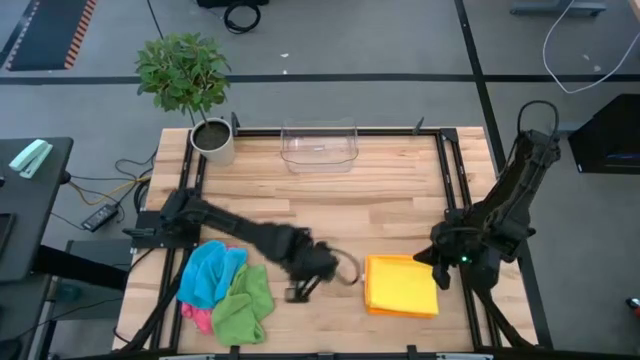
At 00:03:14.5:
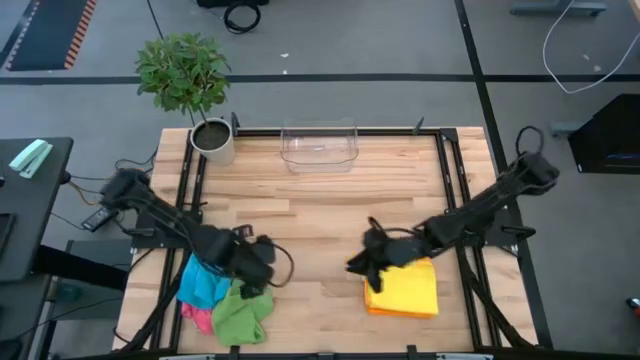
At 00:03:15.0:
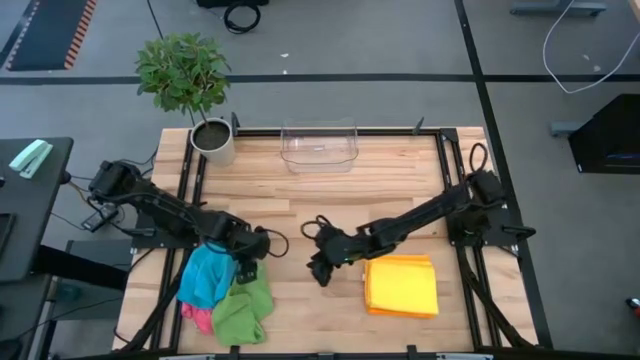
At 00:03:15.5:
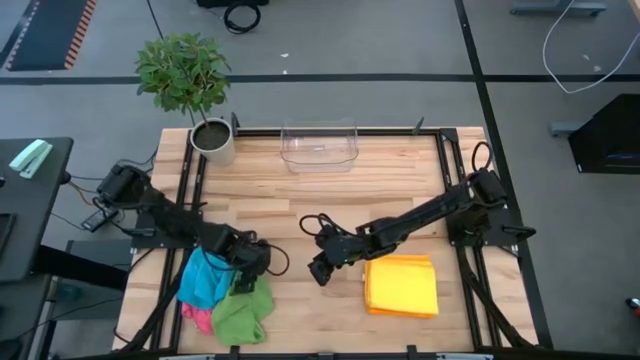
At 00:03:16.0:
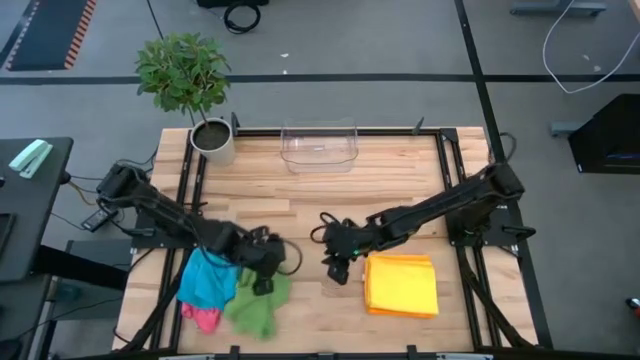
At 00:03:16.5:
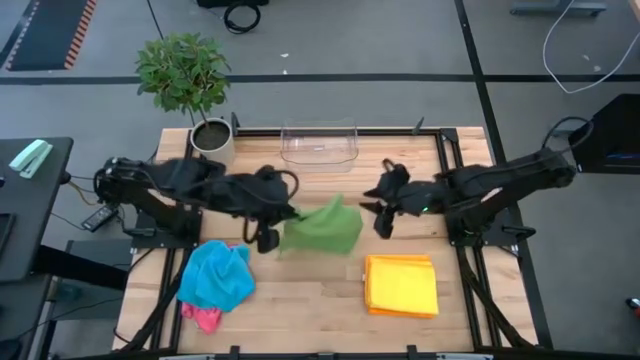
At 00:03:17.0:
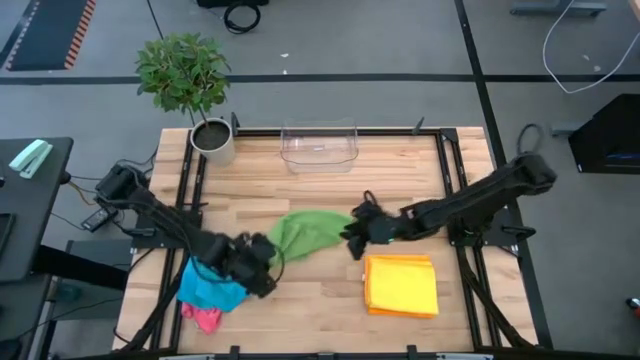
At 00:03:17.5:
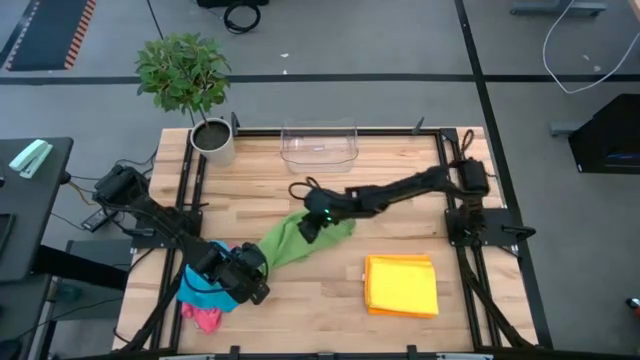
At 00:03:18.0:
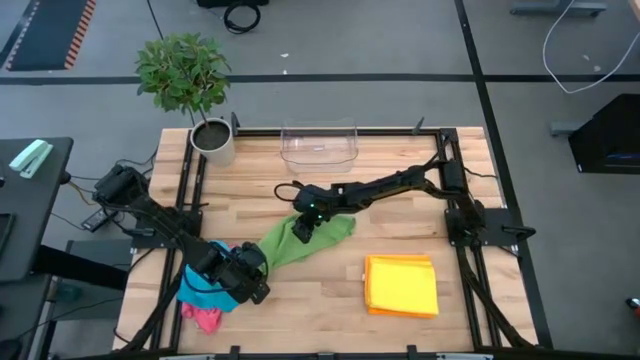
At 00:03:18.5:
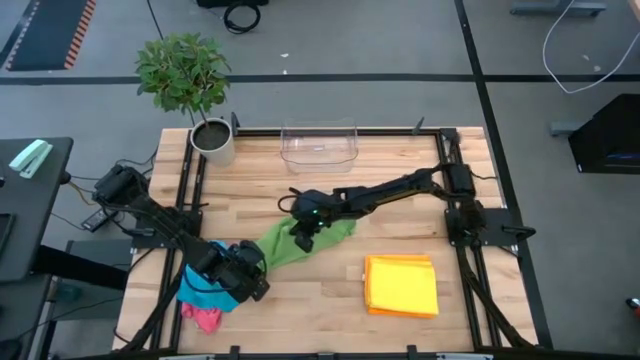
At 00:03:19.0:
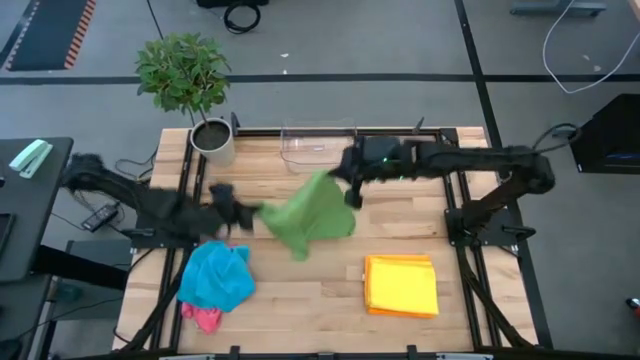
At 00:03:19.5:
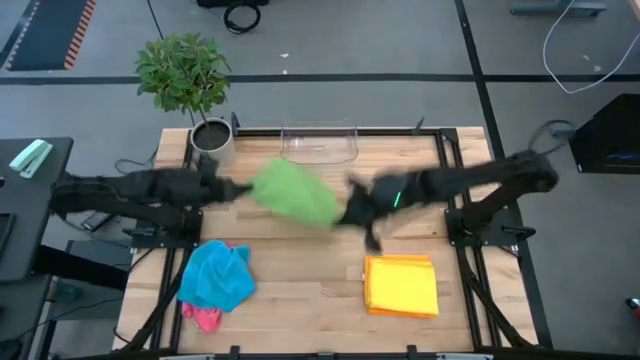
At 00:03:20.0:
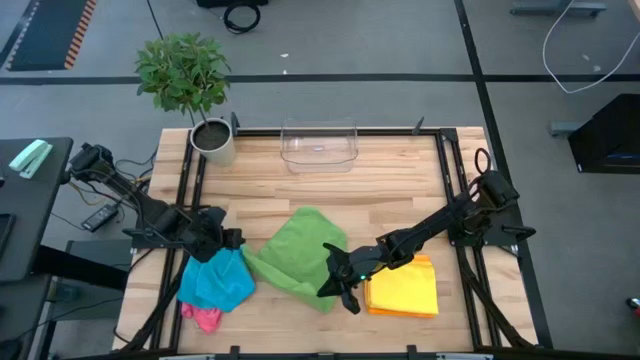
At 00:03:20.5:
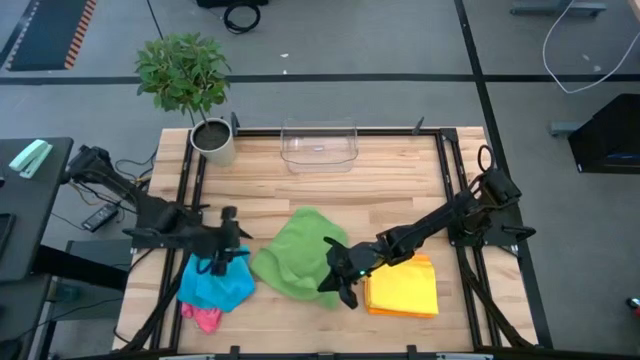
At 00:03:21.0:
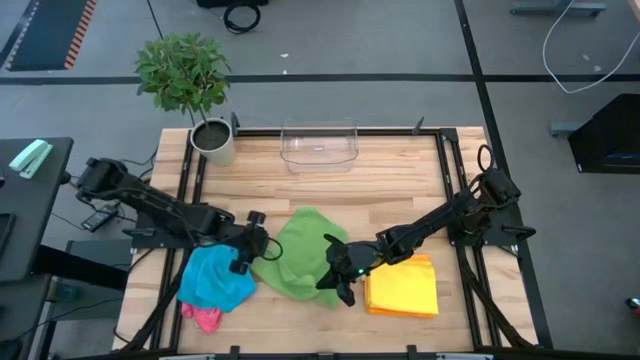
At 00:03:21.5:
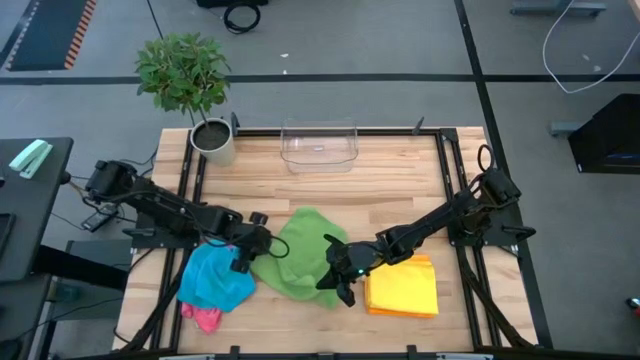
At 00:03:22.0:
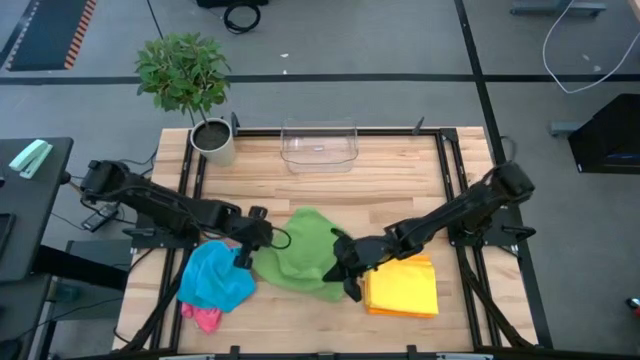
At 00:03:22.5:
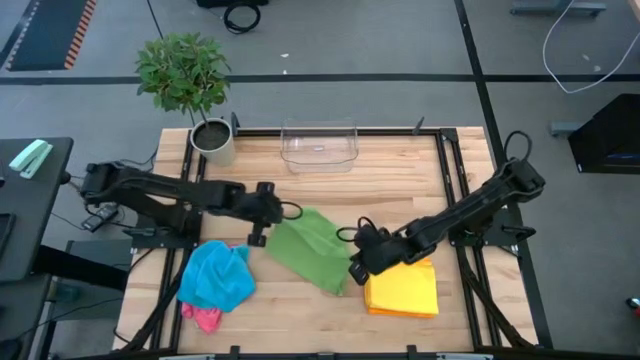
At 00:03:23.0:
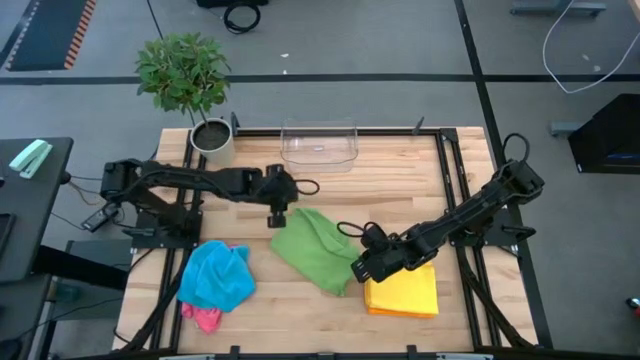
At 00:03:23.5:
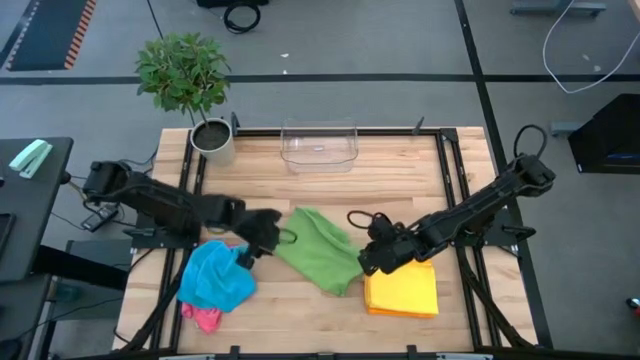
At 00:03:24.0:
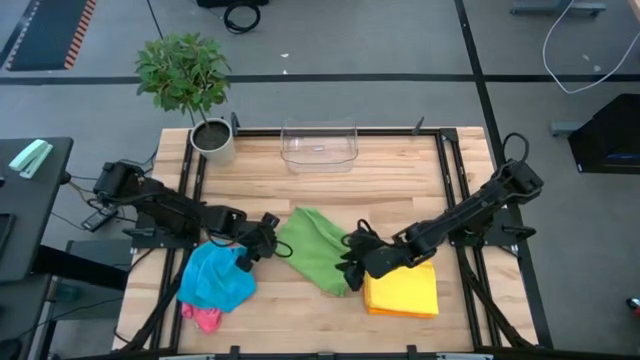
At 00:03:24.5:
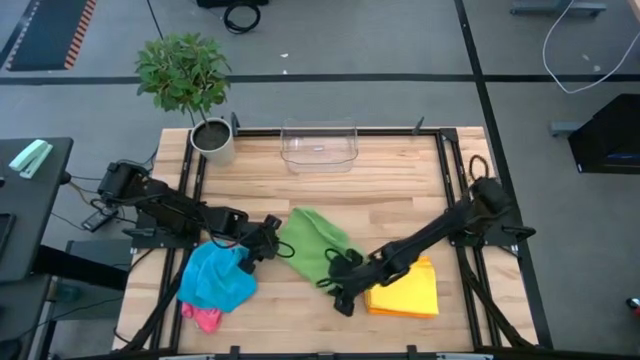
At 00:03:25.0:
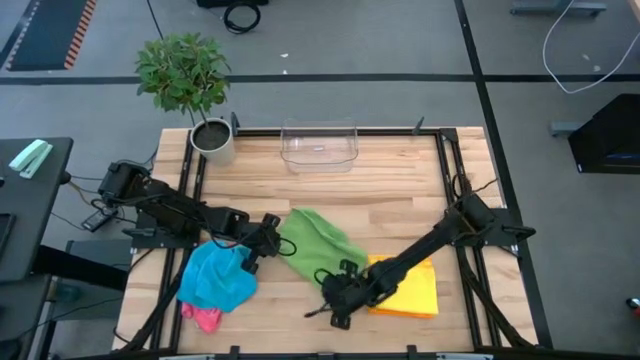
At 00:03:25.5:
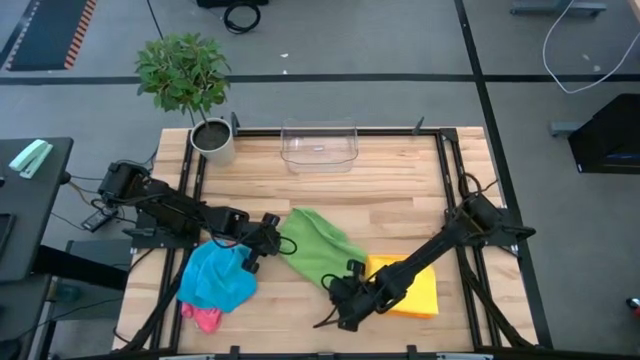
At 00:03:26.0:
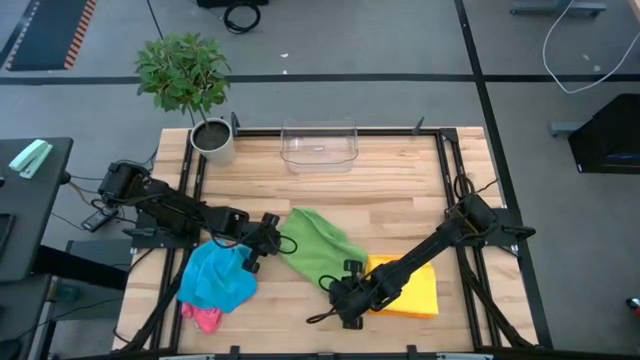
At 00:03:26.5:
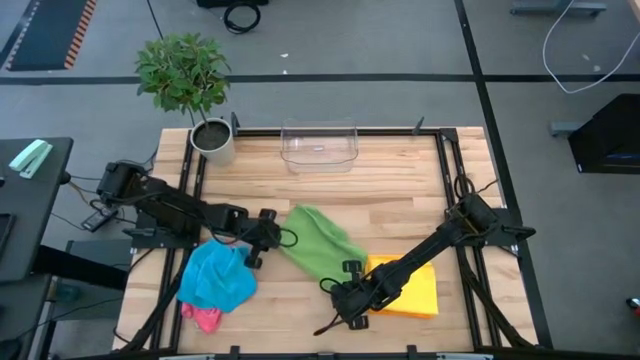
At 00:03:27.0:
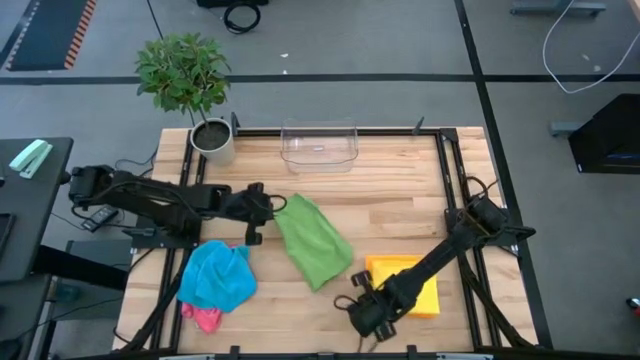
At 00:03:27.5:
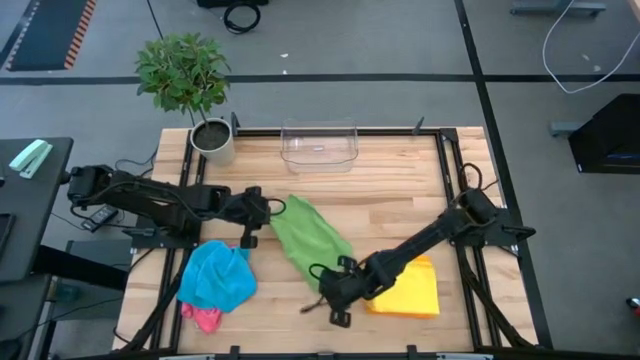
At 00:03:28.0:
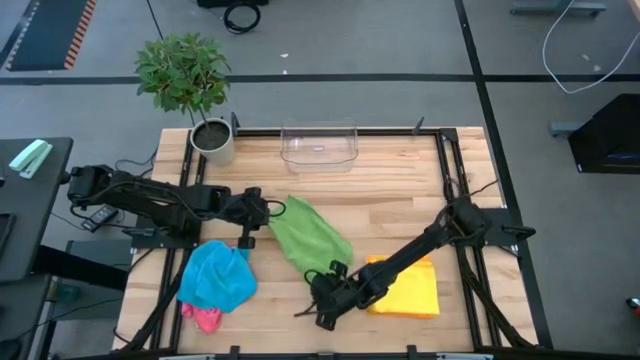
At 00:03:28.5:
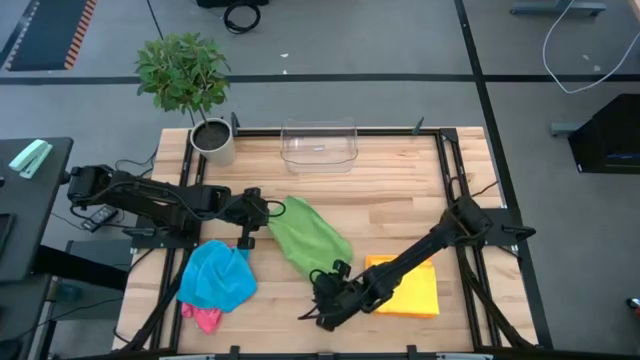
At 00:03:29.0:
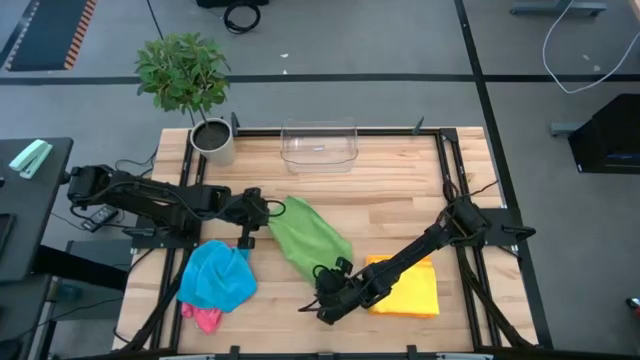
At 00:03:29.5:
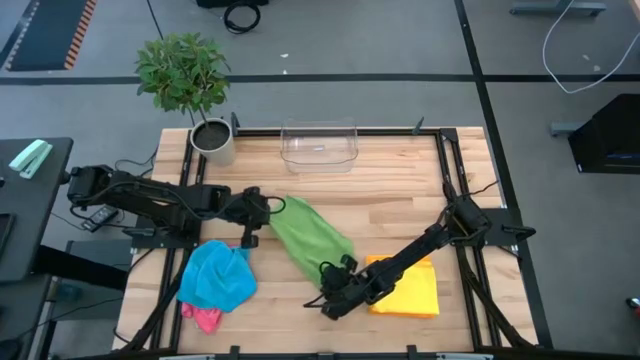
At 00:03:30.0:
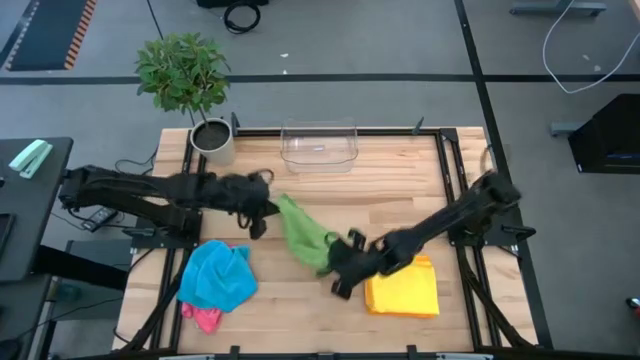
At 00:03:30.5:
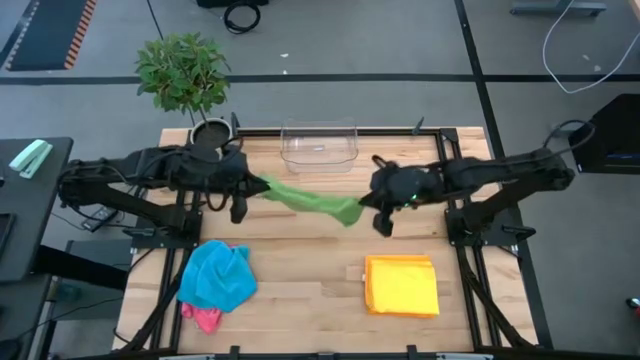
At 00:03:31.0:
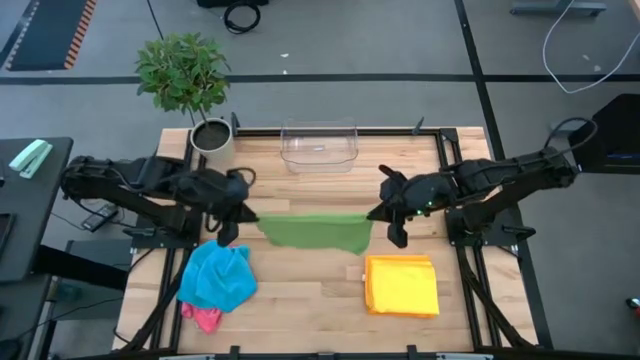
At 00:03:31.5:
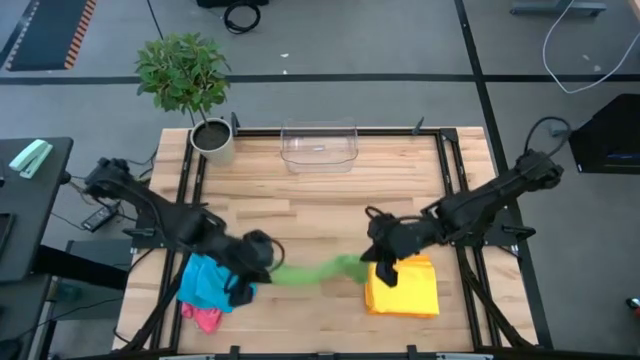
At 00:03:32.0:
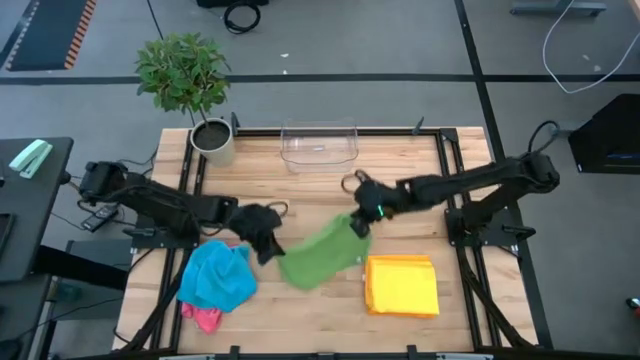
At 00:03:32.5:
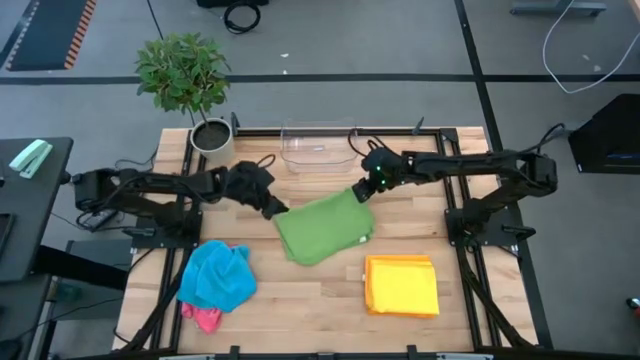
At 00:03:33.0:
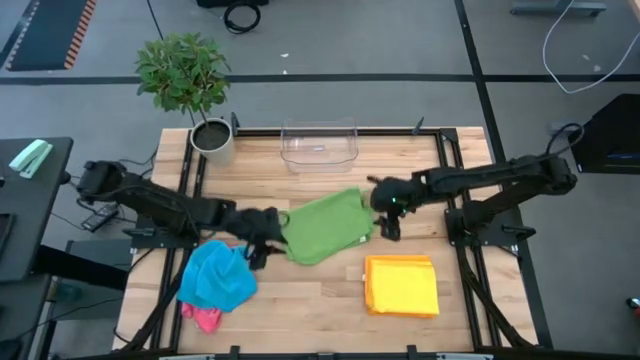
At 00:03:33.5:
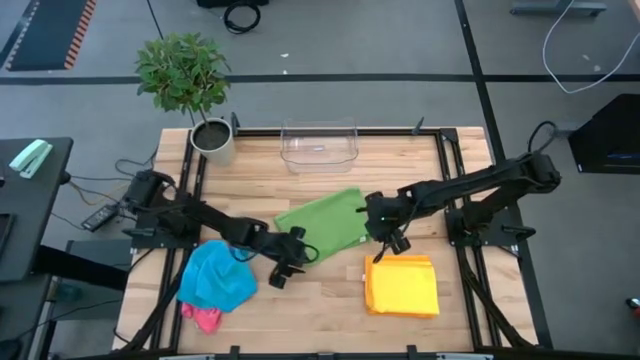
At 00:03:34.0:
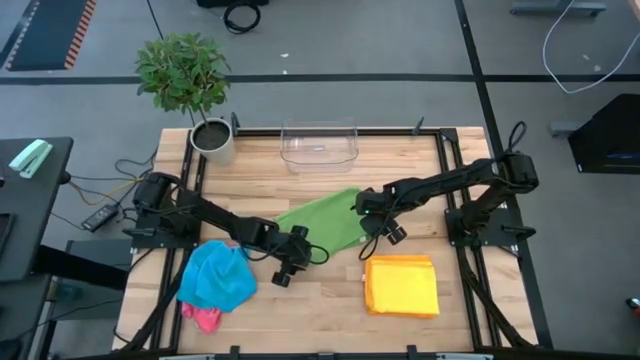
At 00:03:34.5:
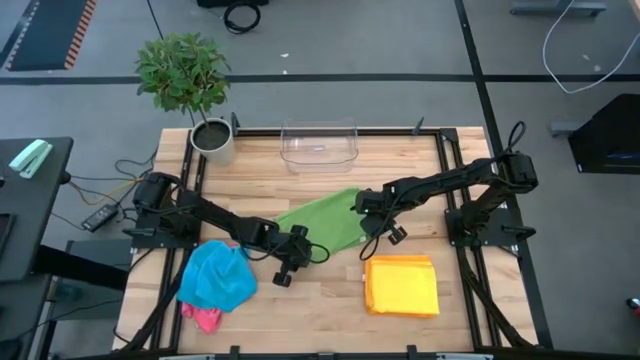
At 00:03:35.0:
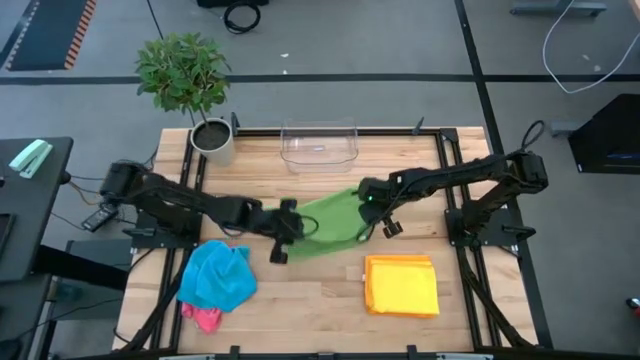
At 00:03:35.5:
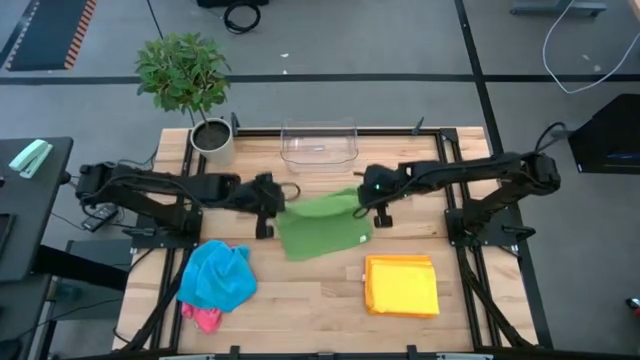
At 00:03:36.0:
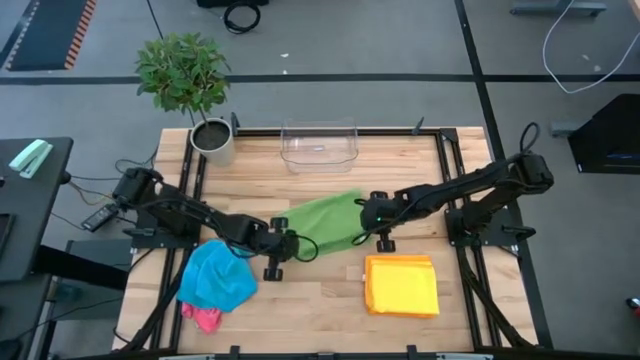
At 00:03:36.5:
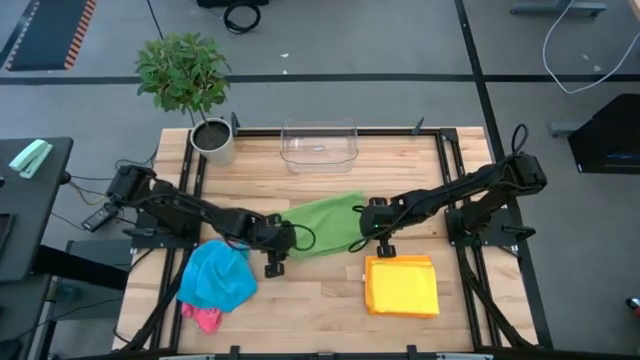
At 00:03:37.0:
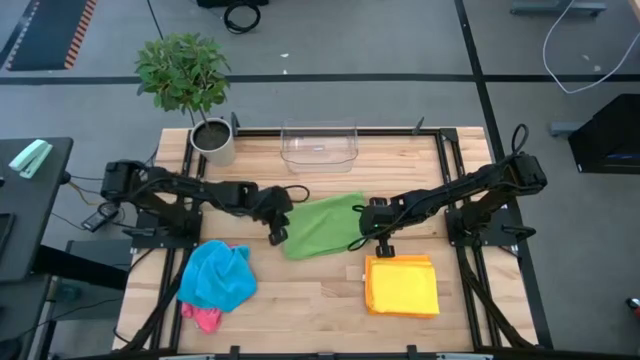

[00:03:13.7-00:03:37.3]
Task: Fold microfiber towels
Fold the green towel on the table
